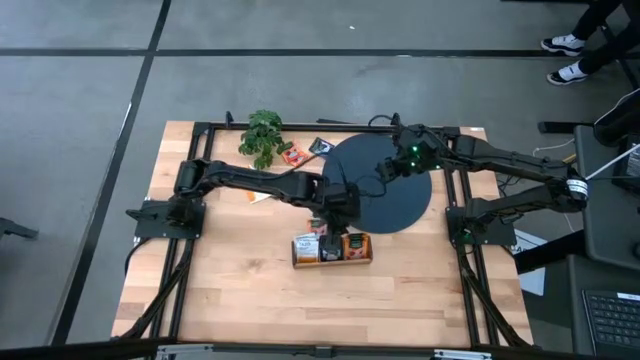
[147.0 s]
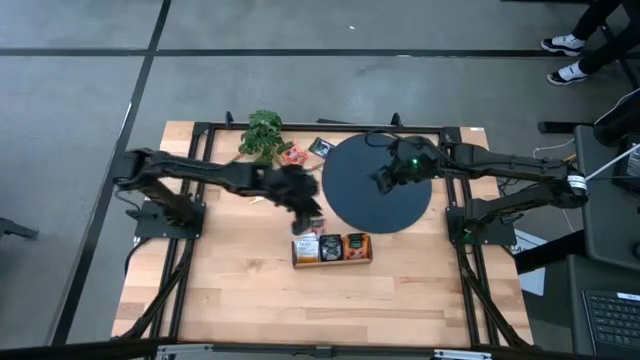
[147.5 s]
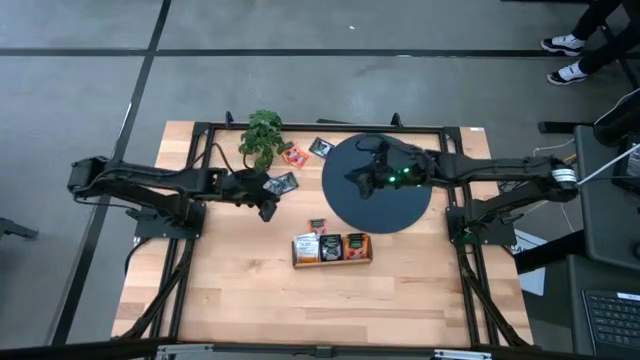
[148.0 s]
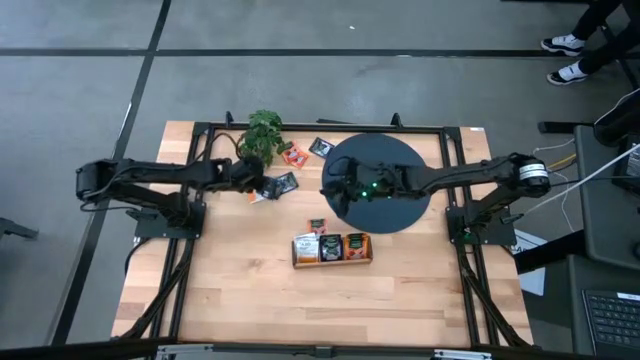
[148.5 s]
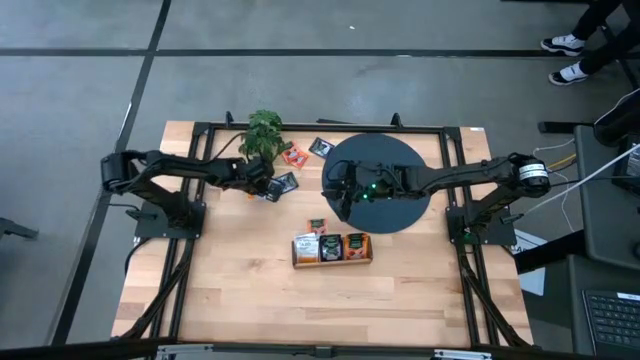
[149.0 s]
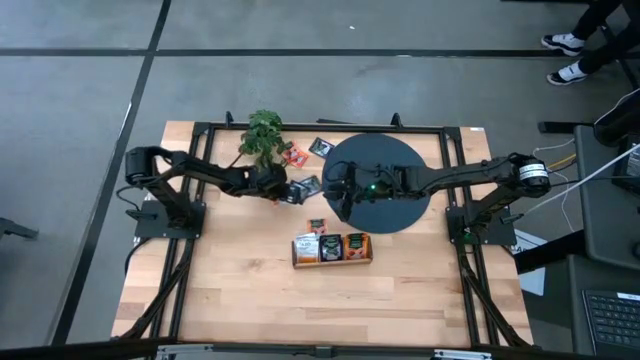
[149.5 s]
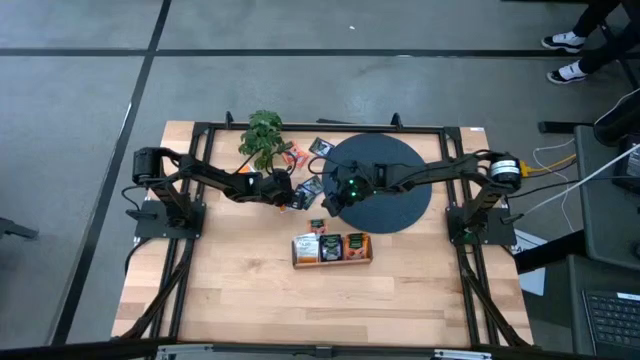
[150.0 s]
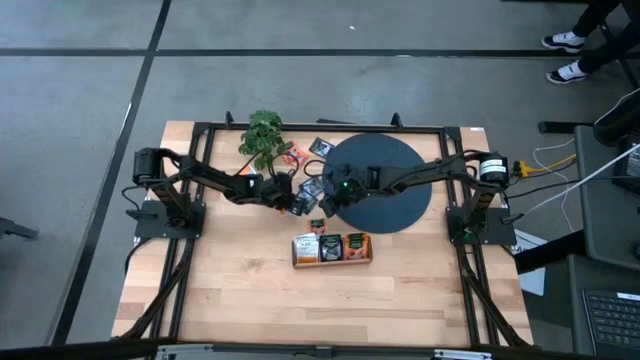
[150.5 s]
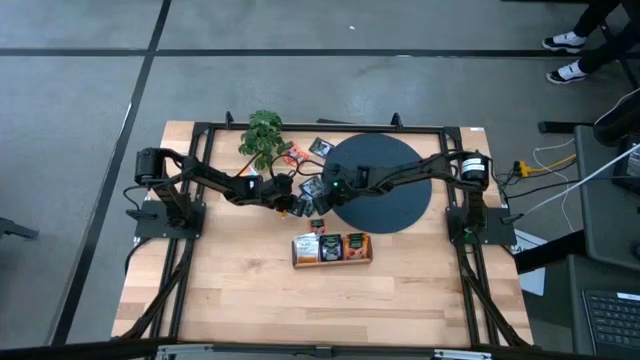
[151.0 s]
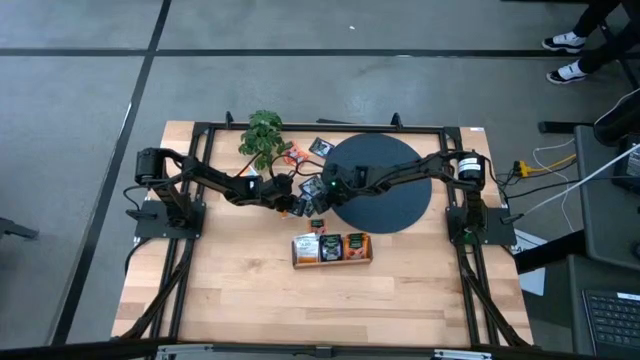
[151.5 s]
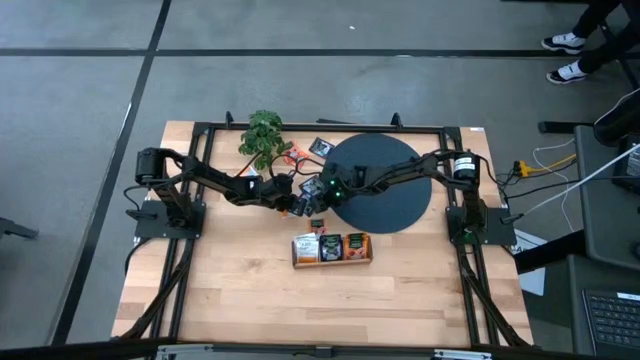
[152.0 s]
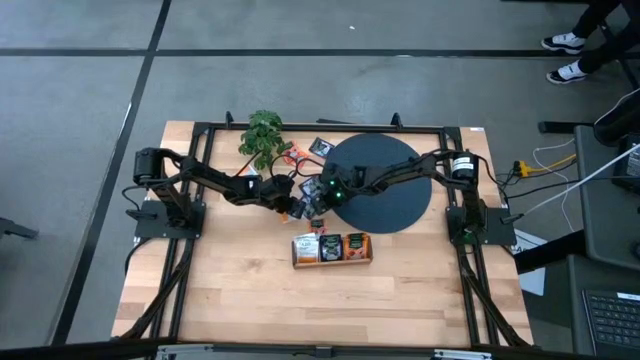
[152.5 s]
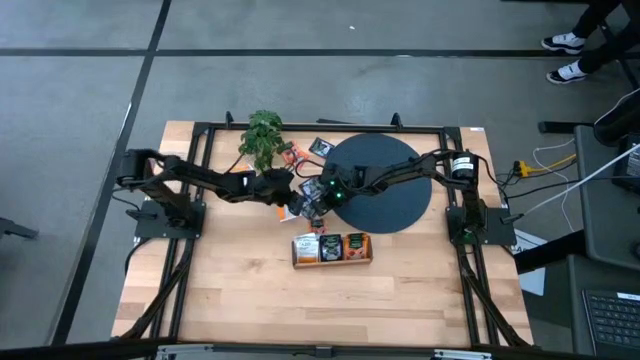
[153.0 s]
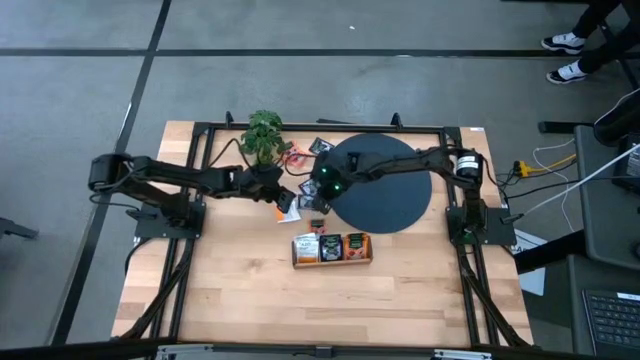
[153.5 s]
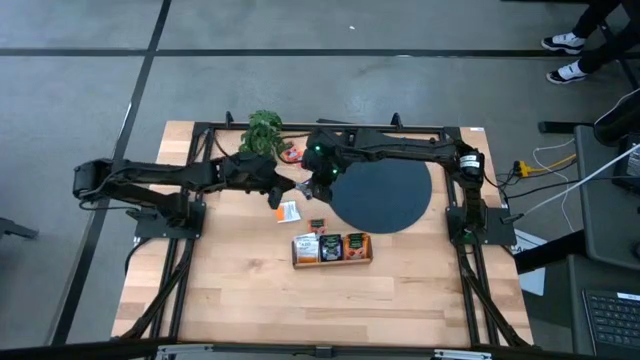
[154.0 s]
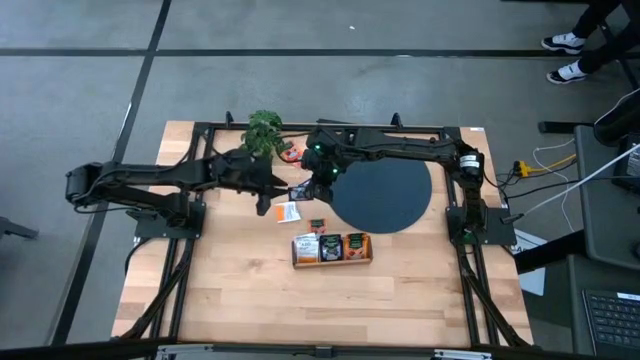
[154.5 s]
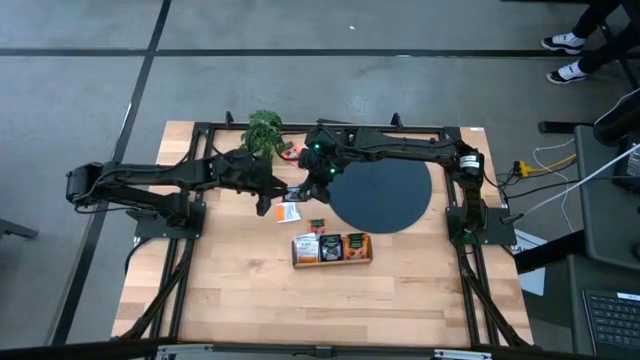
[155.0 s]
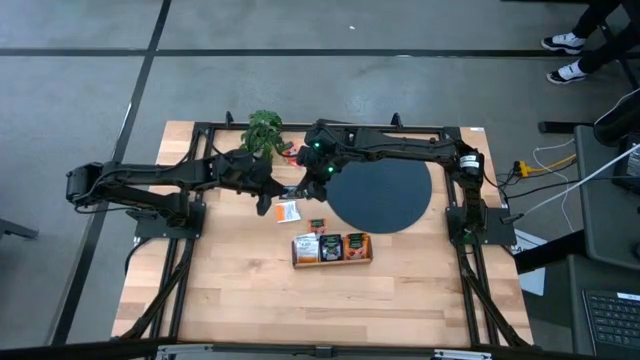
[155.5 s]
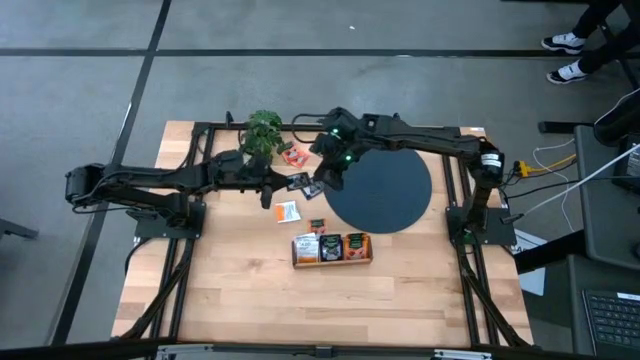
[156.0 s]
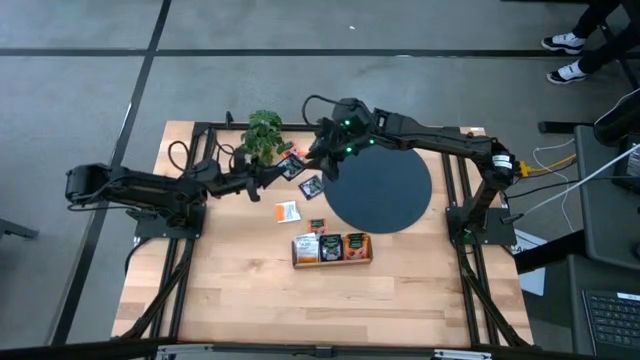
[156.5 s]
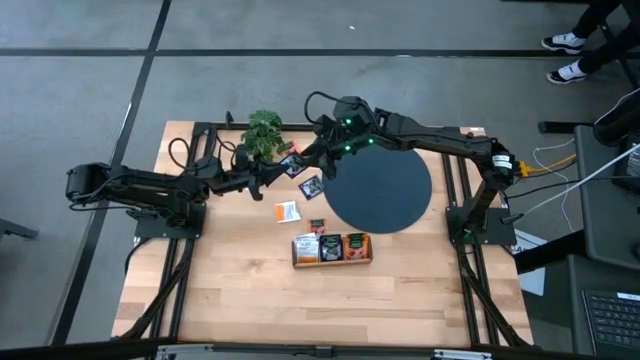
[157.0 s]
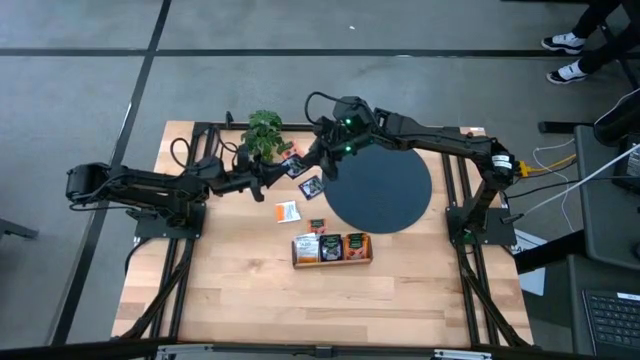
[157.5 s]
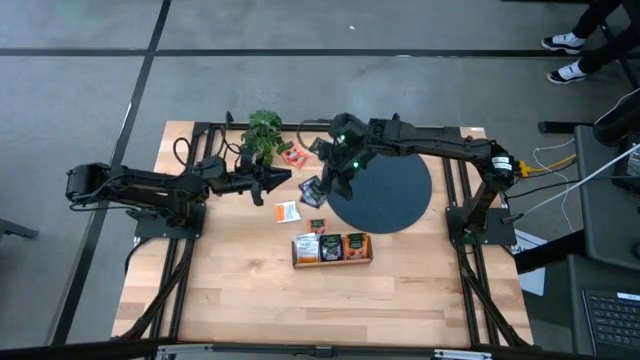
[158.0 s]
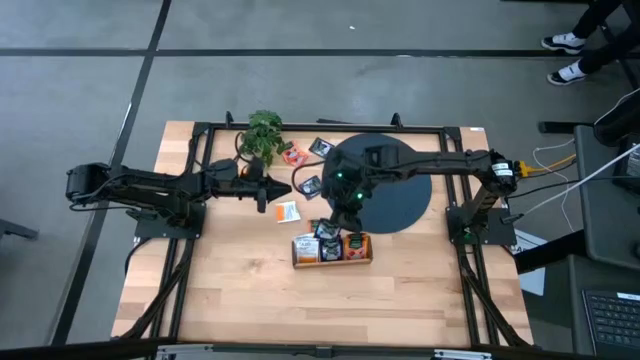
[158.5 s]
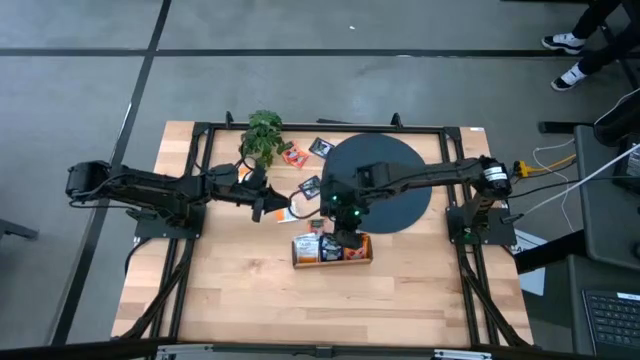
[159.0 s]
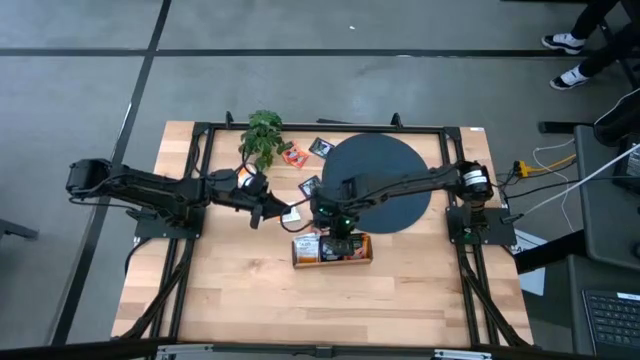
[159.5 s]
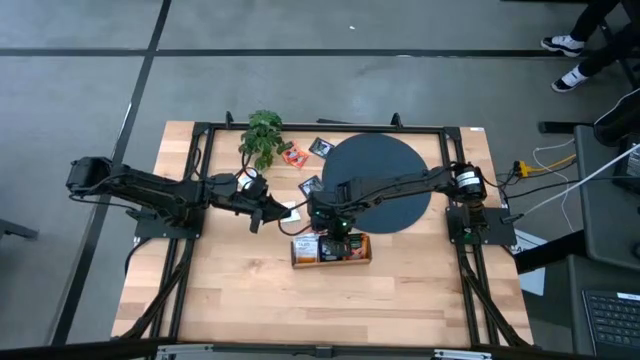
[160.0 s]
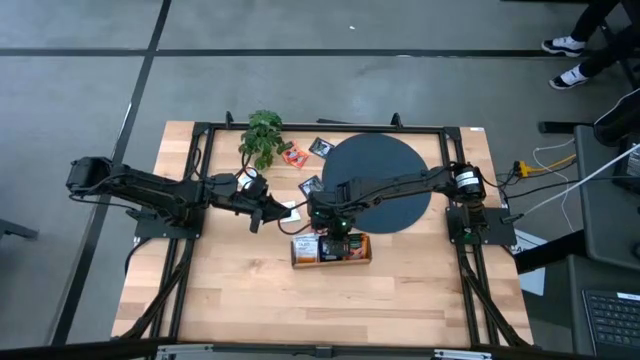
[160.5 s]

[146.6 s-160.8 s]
Task: Pick & Place Tea
Put the bottom left purple tea bag into the middle section of the wooden organizer

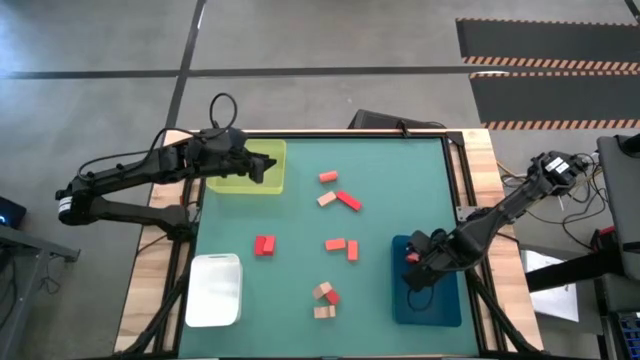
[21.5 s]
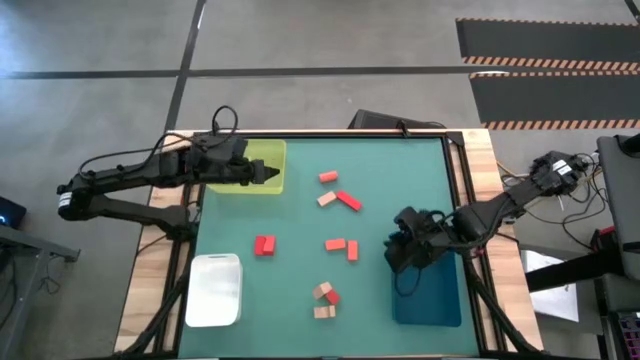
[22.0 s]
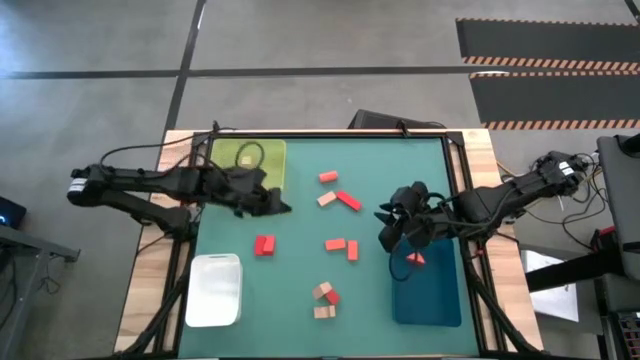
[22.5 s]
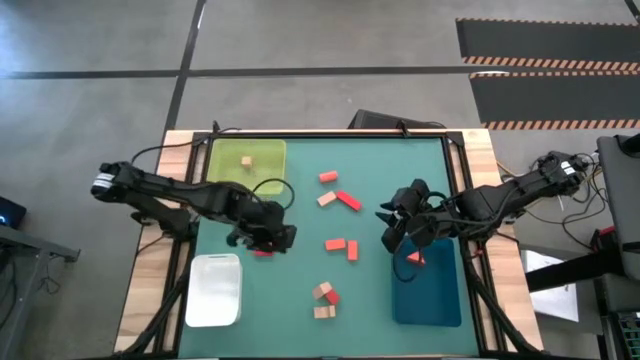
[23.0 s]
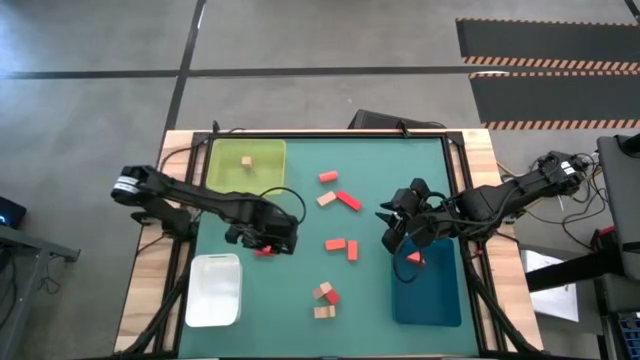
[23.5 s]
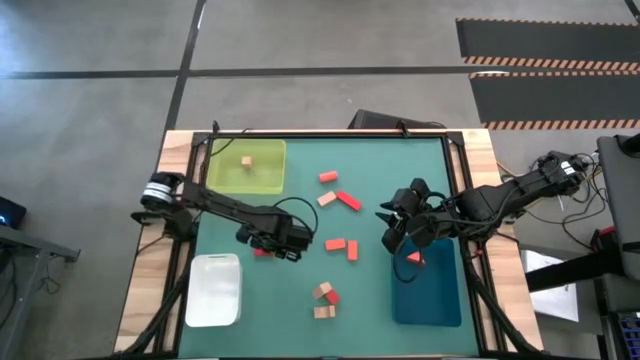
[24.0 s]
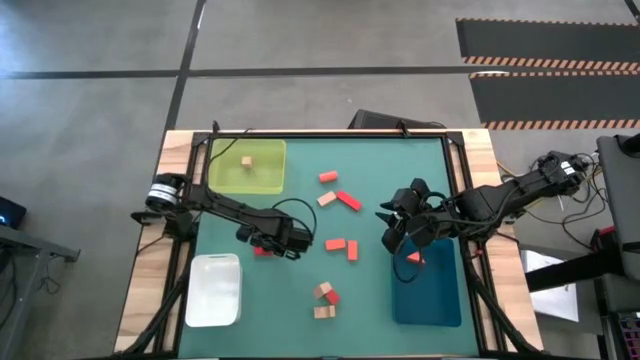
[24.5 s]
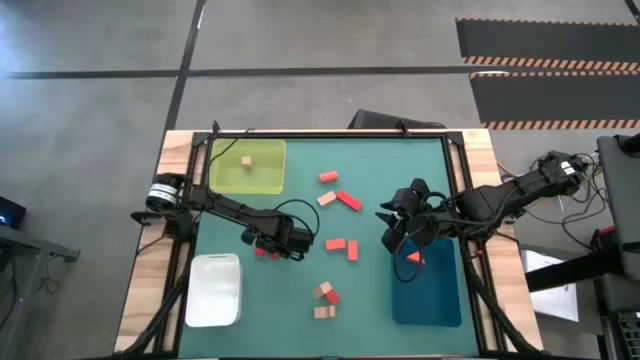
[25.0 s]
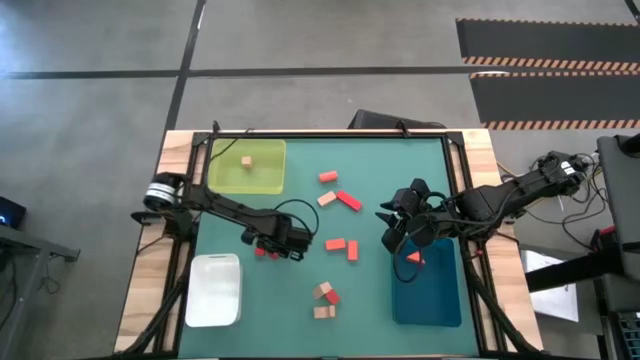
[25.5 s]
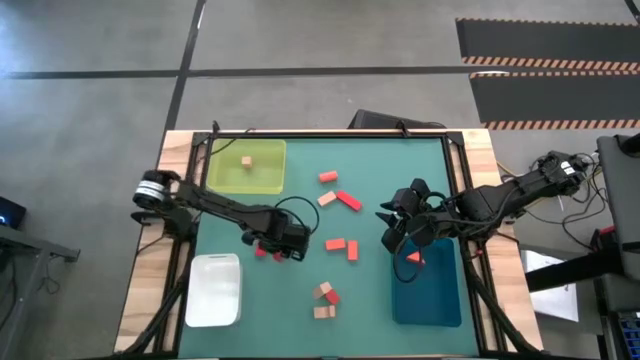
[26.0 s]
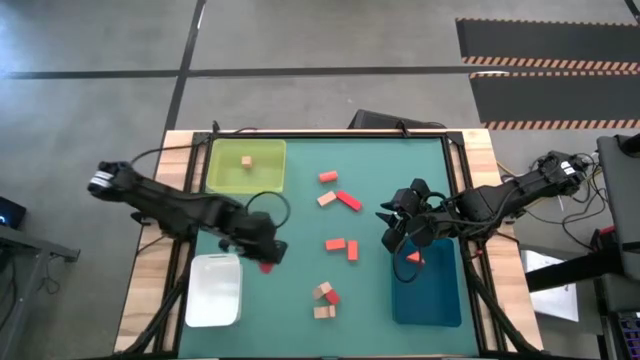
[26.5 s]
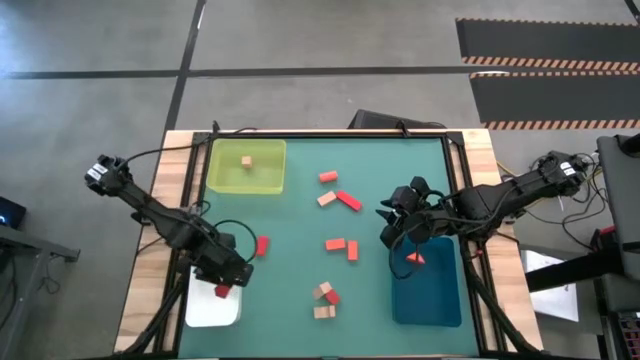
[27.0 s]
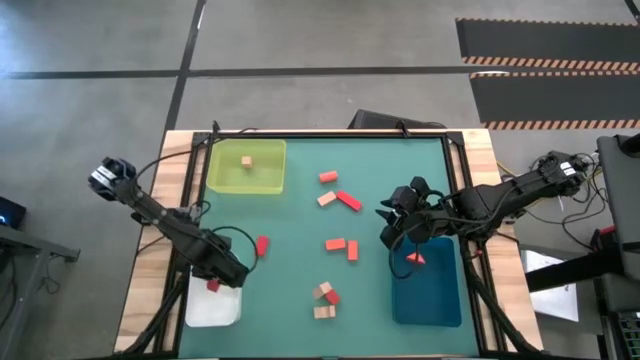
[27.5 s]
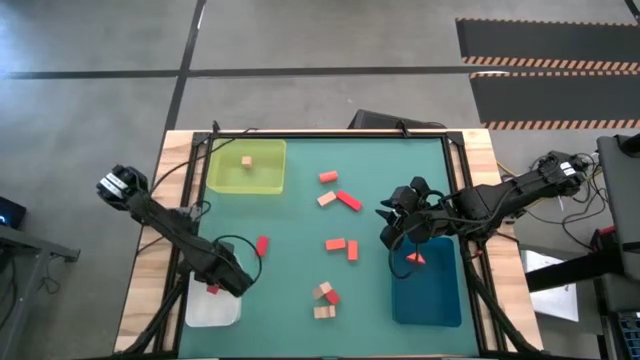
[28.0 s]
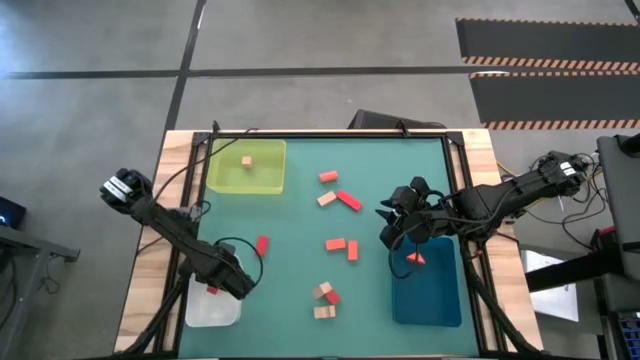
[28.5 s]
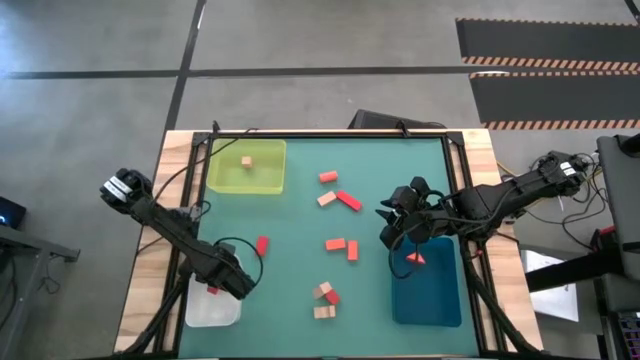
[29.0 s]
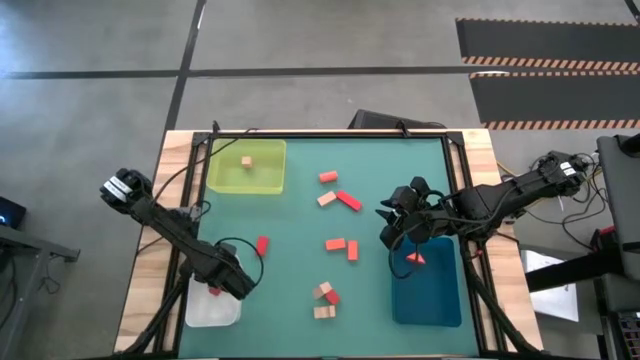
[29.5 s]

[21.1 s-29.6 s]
Task: Sort & place blocks by color
Put the red block into the white bin
